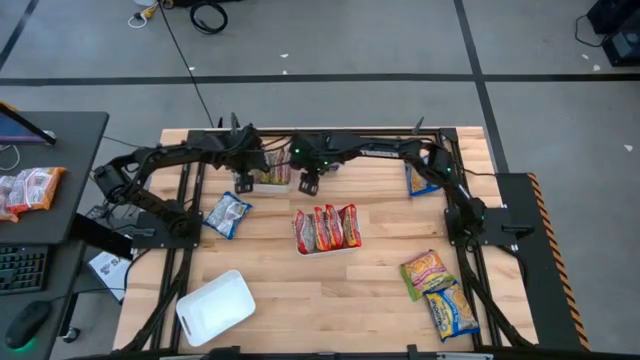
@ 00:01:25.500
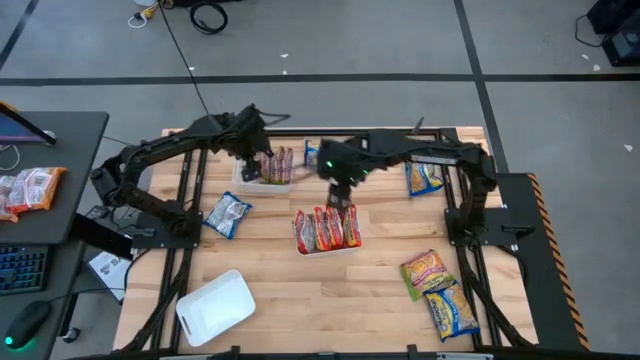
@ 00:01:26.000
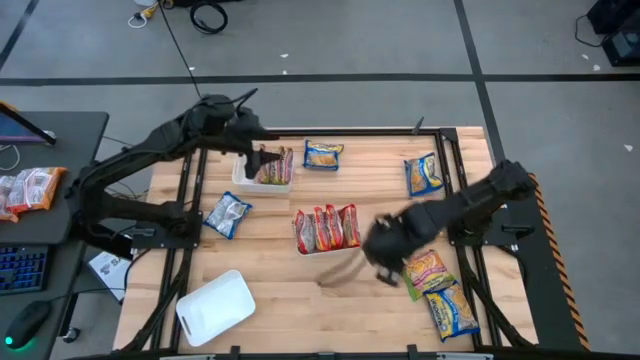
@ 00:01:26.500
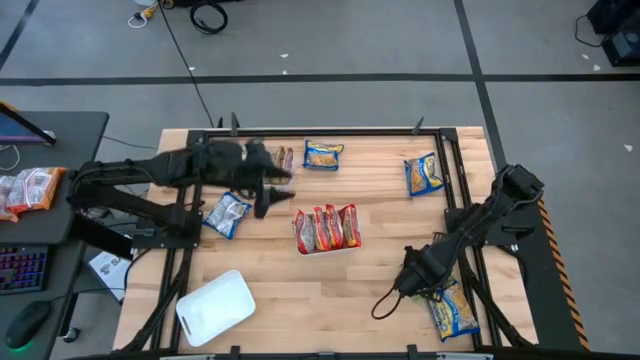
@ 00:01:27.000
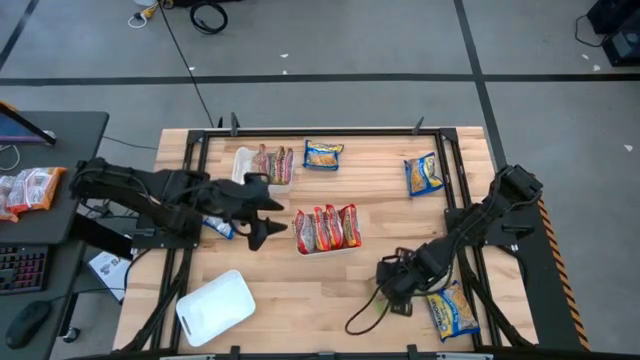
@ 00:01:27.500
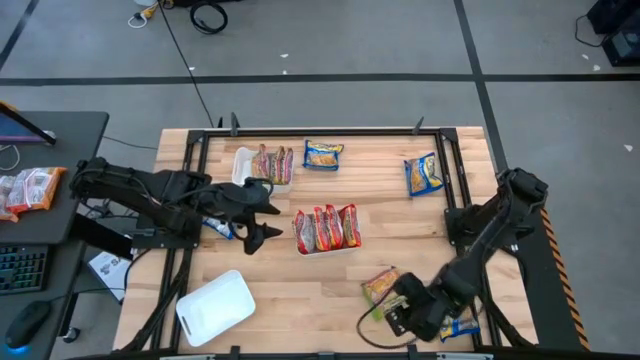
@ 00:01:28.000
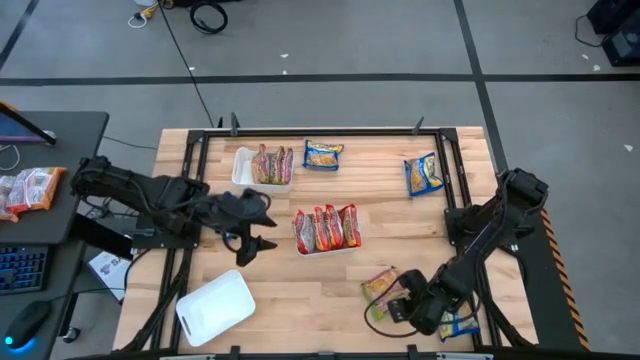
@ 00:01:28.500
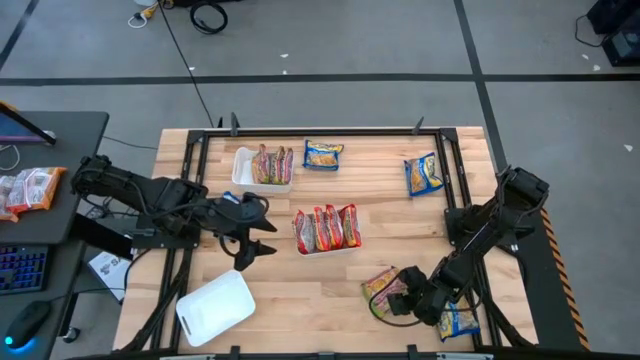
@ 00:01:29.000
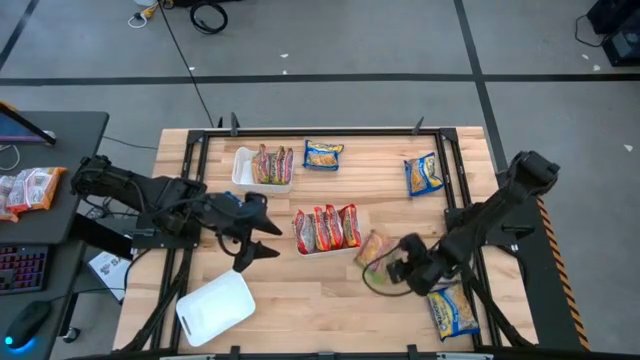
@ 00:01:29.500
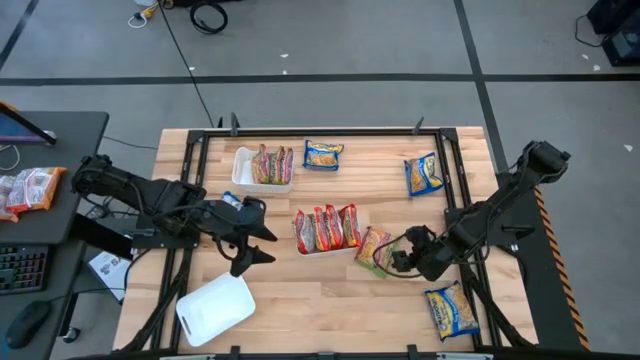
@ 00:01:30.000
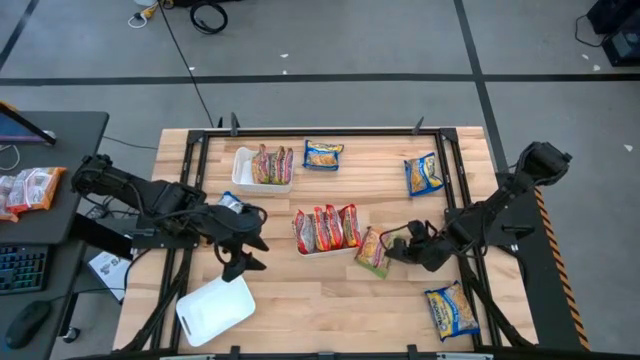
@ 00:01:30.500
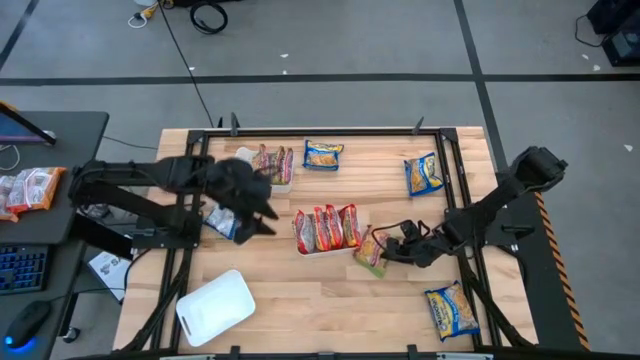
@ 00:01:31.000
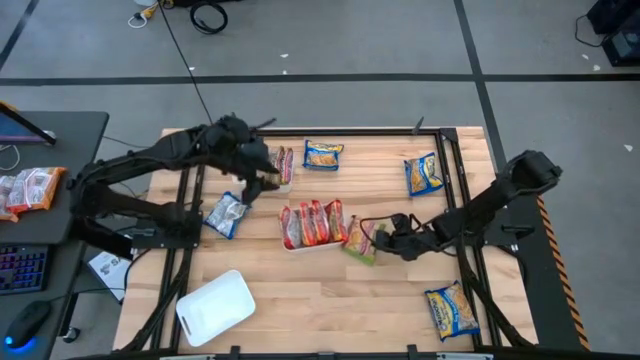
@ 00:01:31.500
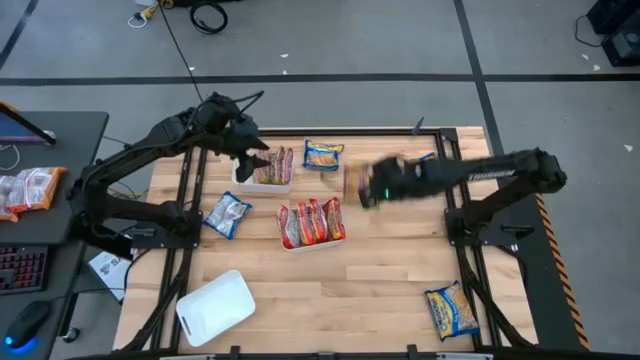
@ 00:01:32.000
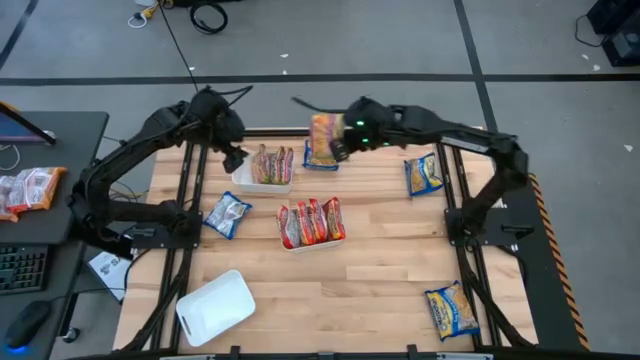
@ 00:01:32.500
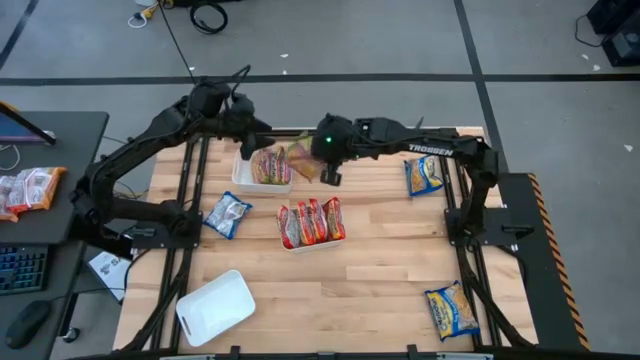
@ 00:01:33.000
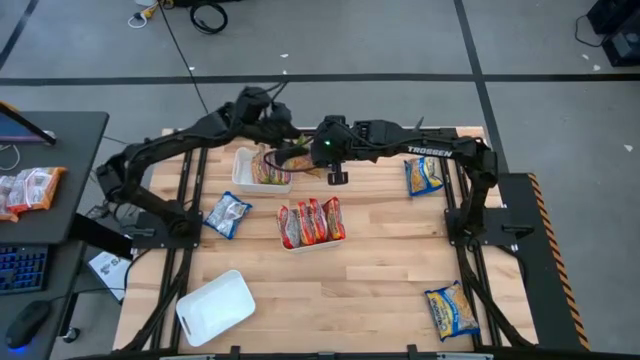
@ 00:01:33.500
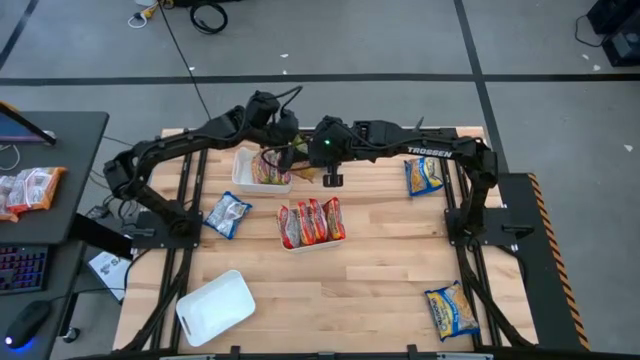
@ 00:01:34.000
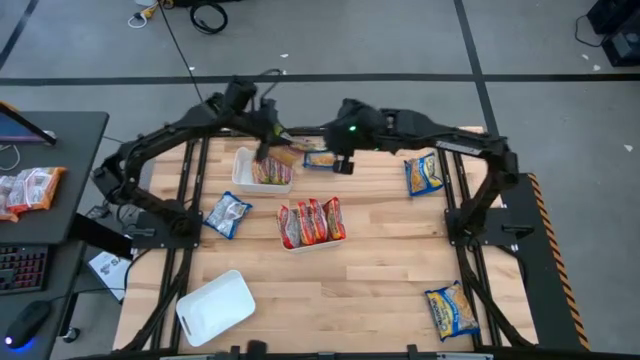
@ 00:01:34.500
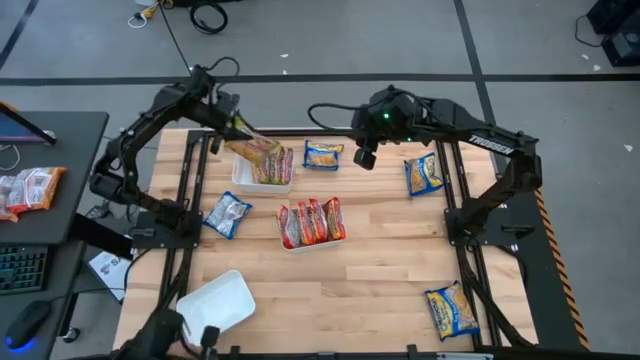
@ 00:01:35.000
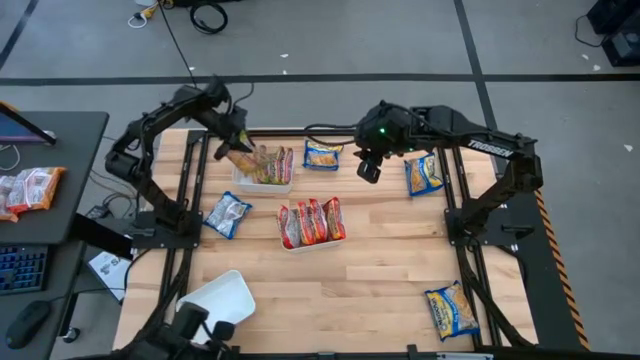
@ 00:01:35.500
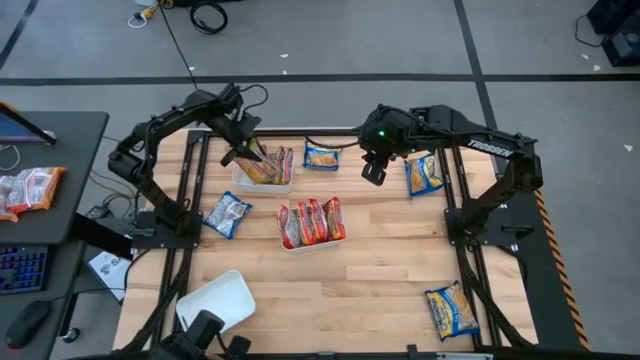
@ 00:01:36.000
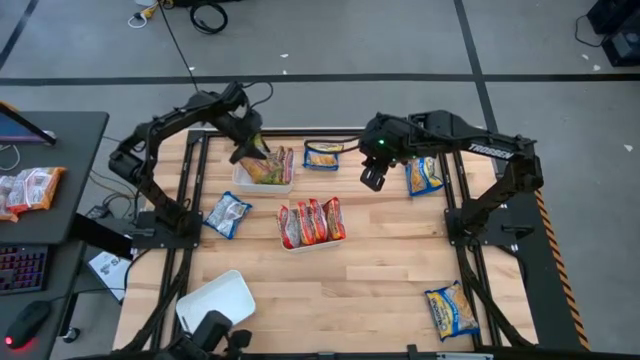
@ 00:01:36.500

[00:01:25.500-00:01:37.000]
Task: Sort Maruchan noodles
Put the green noodle pack into the top white bin

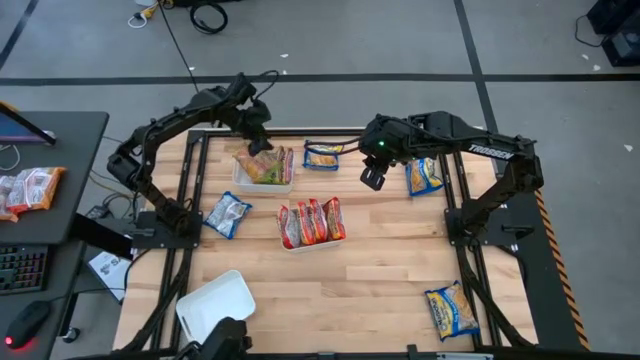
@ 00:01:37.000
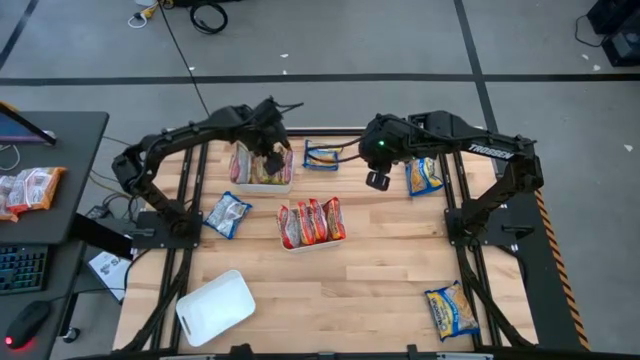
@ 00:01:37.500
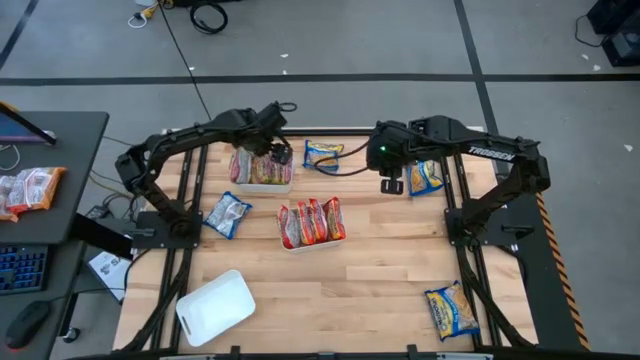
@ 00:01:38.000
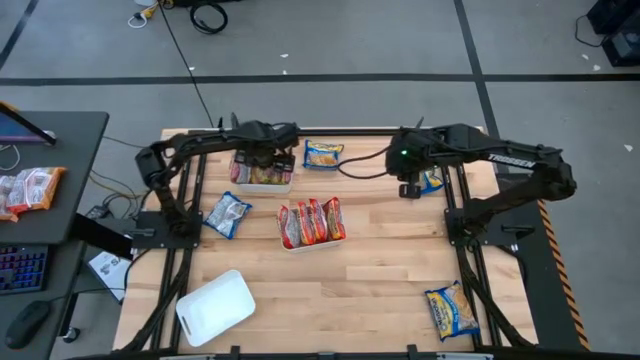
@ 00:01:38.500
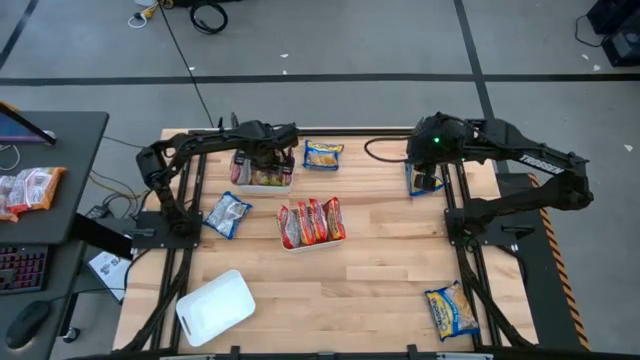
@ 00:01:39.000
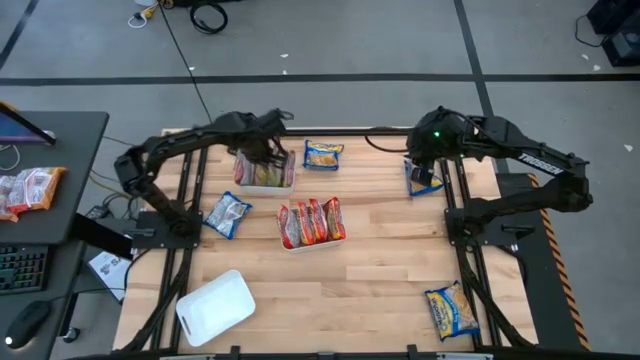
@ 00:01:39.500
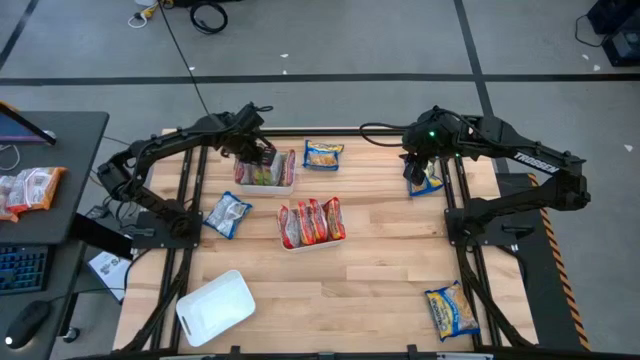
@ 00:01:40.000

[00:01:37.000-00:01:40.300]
Adjust the green noodle packs in the top white bin

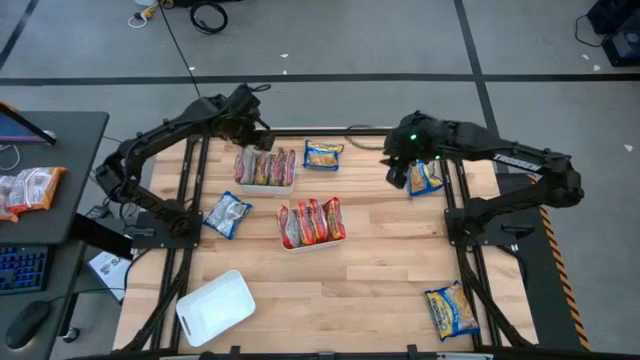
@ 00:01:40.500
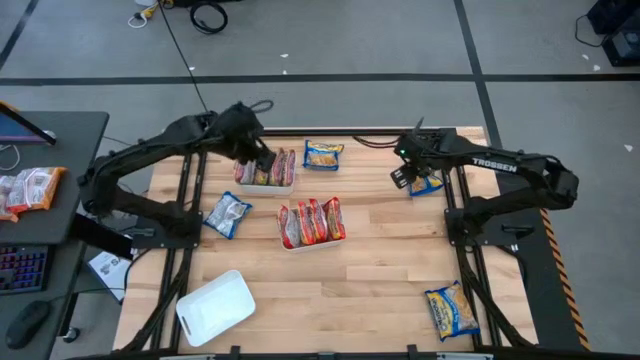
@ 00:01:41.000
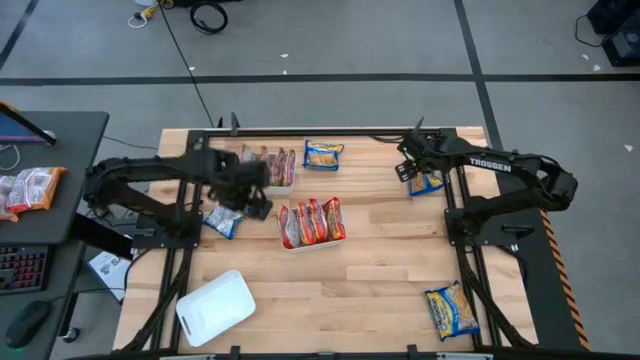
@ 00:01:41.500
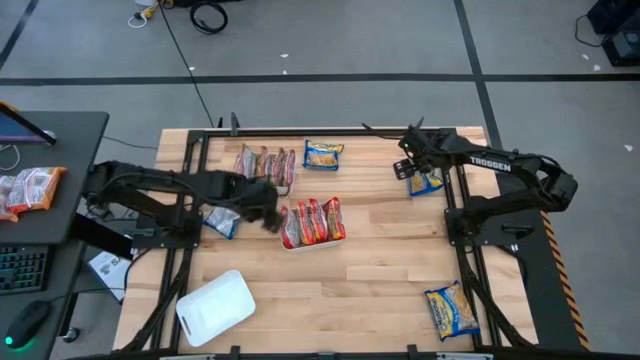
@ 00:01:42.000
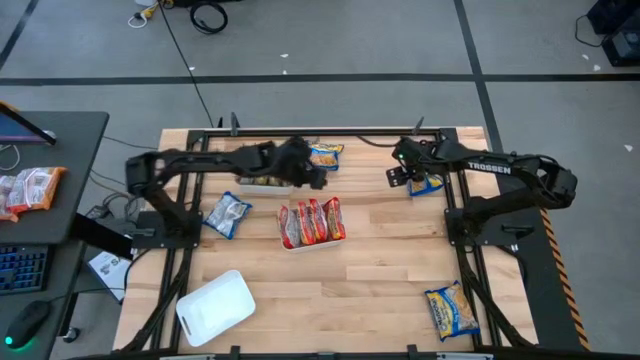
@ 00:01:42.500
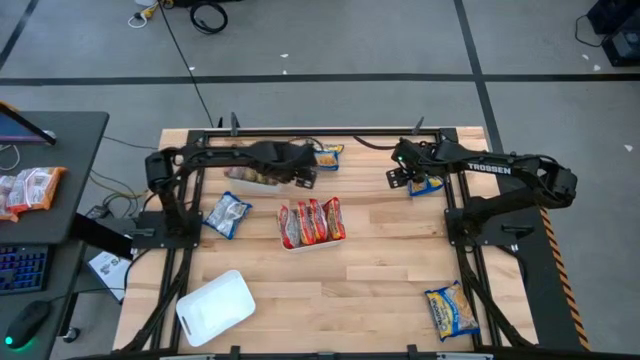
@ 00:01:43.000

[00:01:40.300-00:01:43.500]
Adjust the top white bin on the table

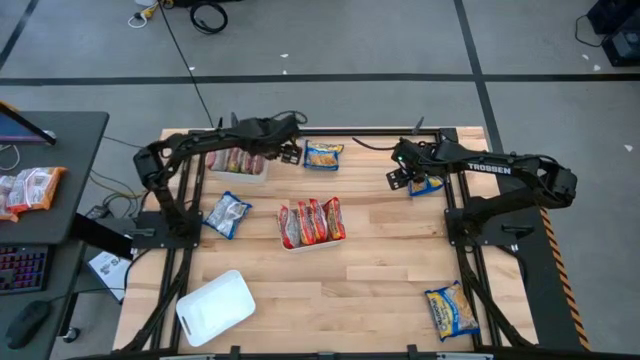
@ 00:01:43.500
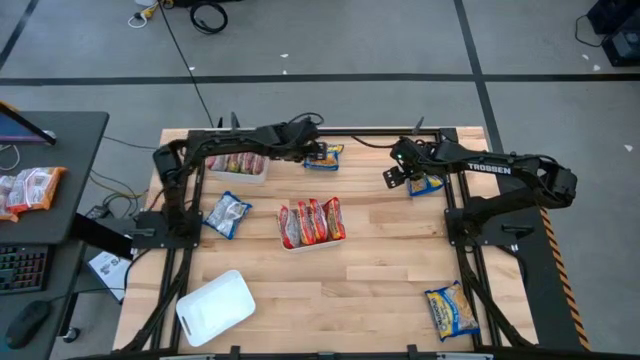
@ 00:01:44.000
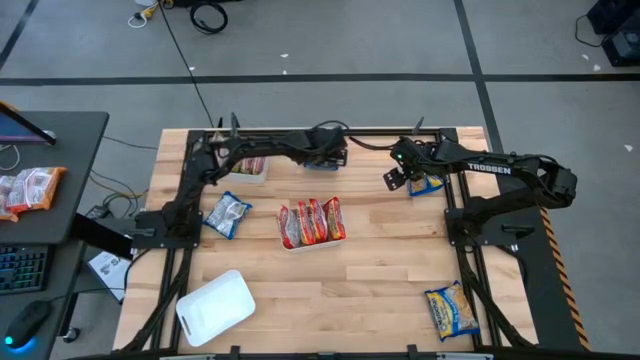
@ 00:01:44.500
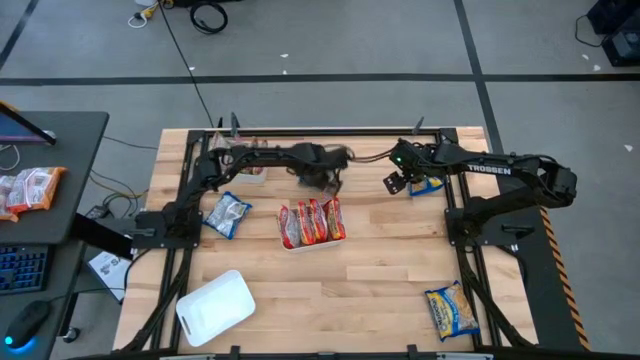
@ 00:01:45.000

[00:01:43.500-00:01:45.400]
Put the blue noodle pack into the bottom white bin
